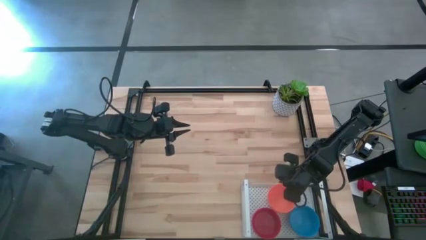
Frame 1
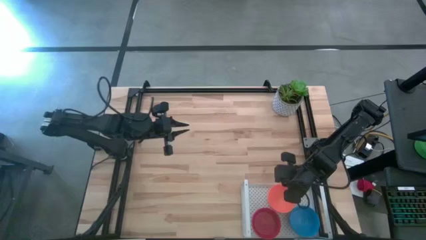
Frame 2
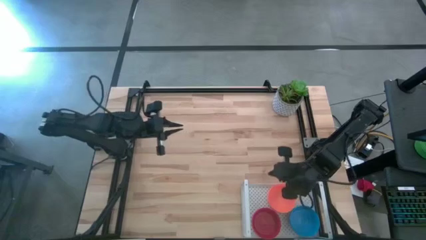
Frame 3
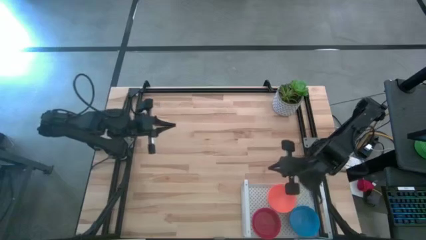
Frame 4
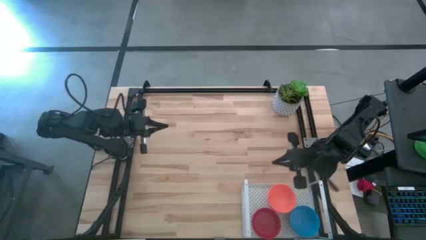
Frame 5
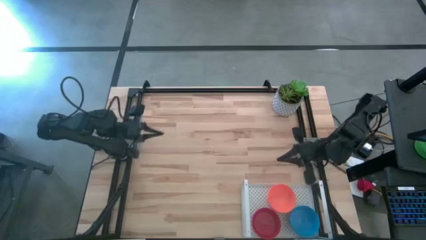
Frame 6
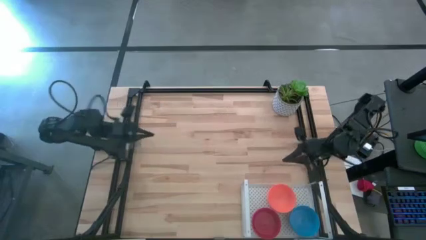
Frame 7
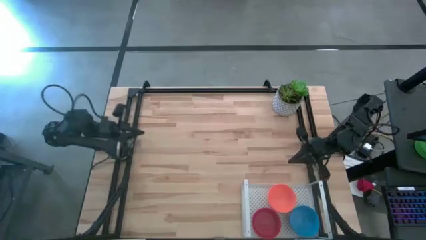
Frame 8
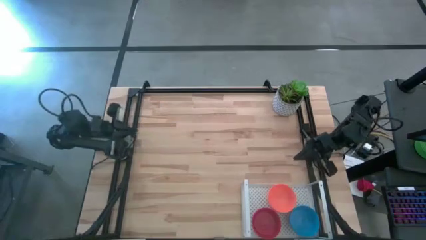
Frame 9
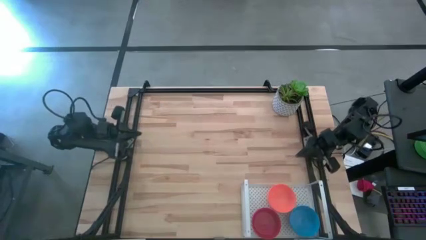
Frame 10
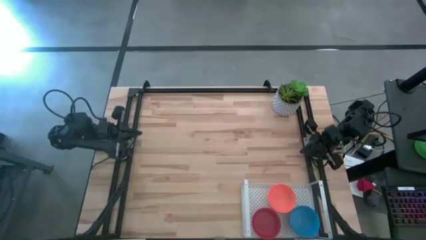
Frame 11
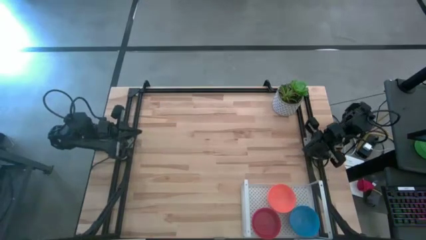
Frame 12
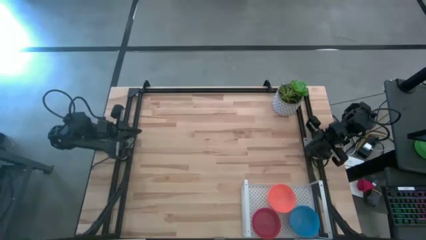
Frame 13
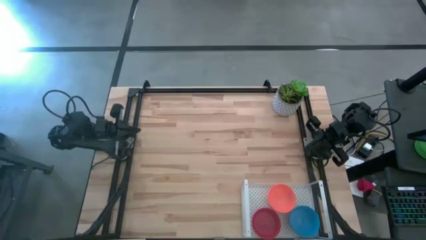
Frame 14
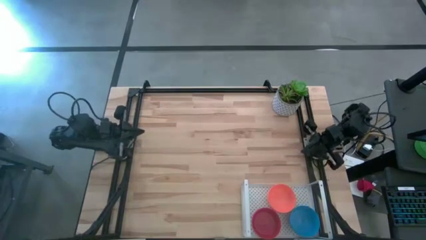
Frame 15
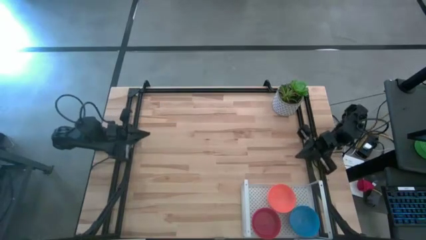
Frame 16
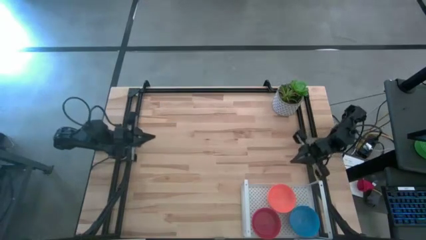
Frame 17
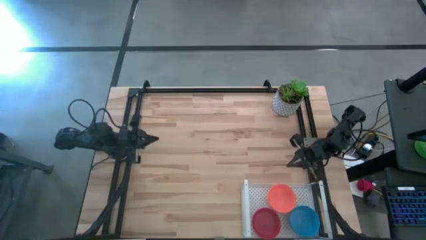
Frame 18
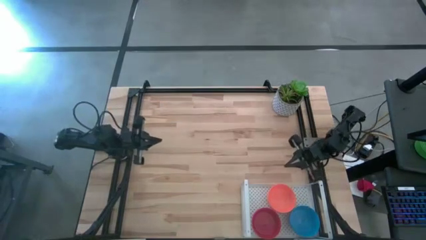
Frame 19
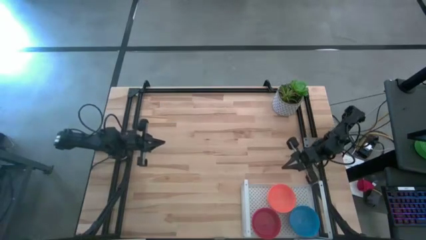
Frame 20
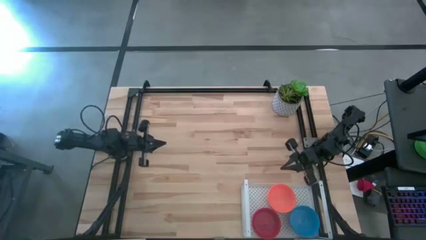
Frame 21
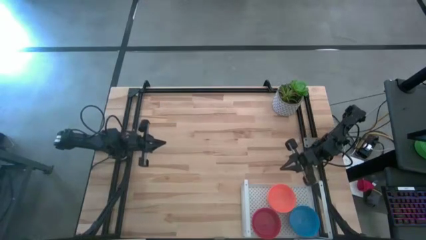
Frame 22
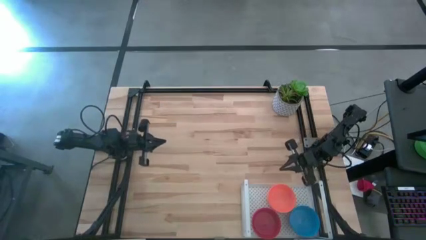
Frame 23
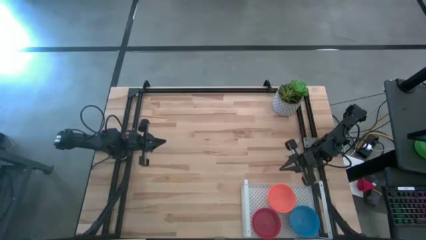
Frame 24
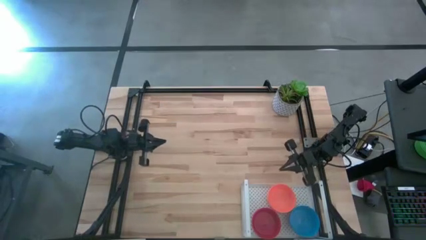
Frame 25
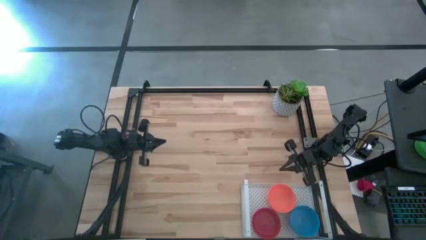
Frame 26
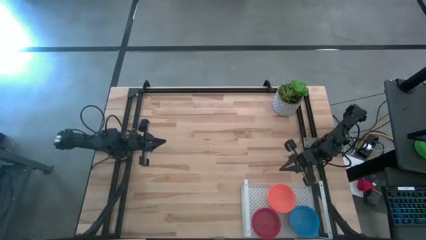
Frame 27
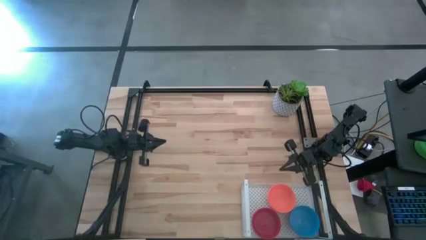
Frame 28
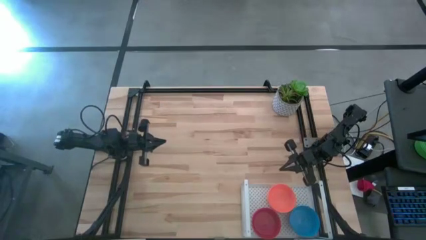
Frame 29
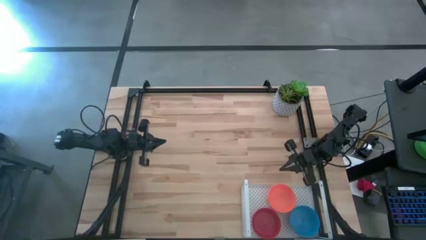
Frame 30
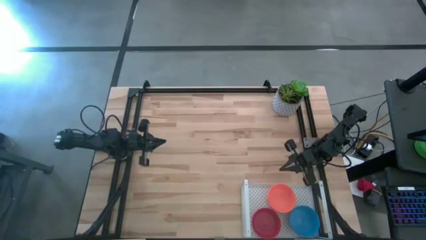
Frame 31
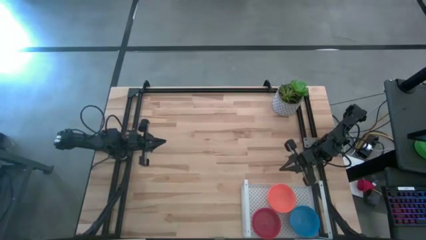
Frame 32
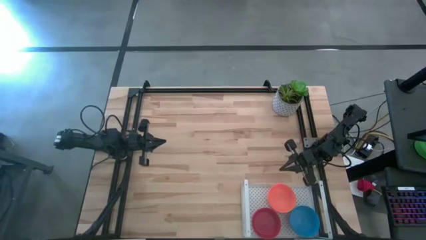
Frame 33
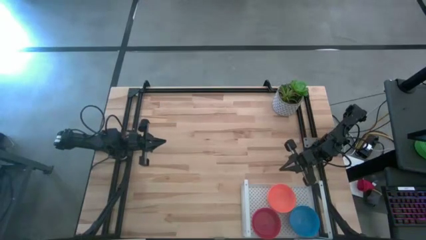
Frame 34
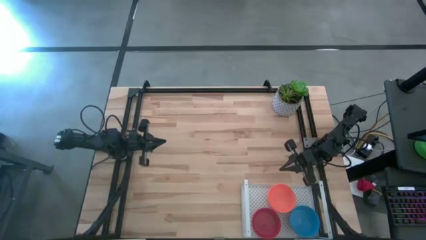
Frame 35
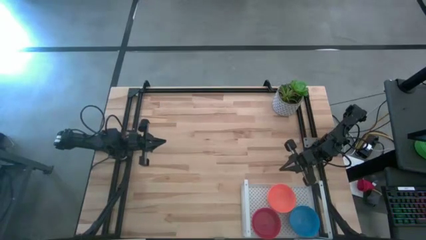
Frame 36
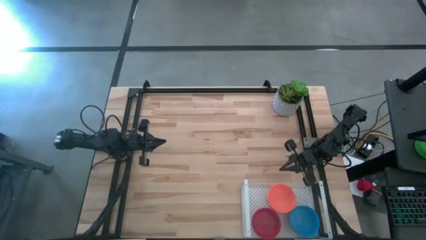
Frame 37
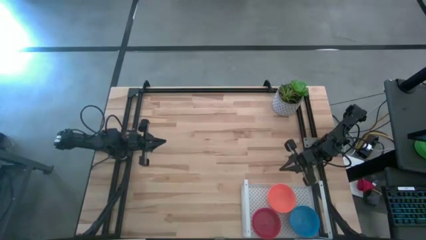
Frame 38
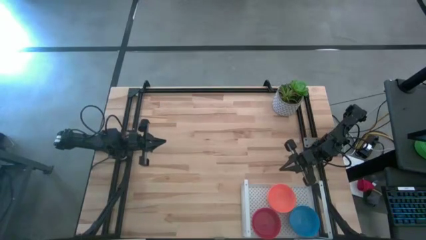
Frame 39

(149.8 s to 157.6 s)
Task: Pick & Place Mini bowls
Return to Home Position

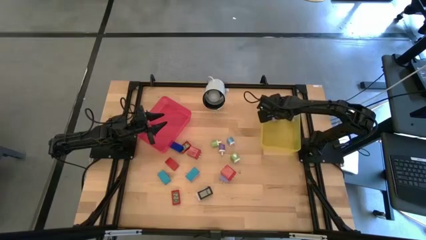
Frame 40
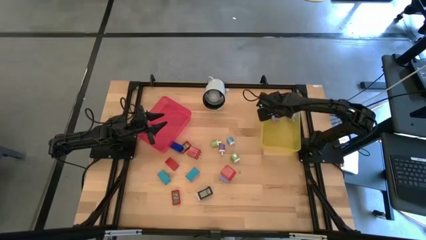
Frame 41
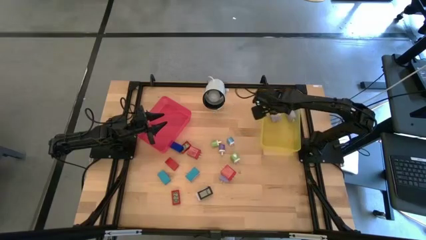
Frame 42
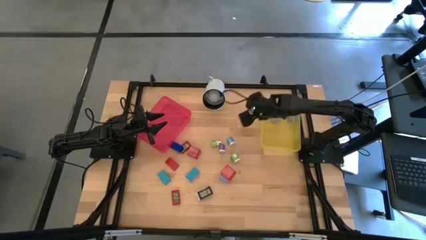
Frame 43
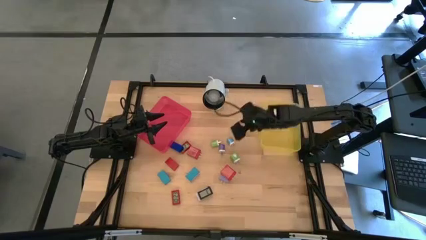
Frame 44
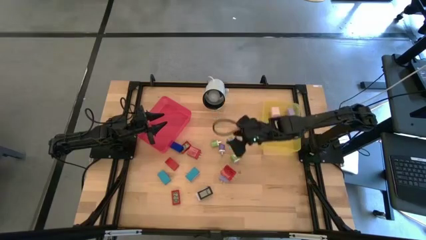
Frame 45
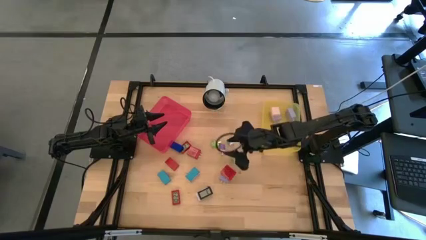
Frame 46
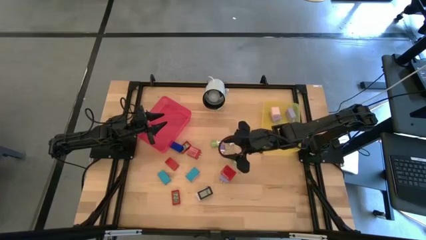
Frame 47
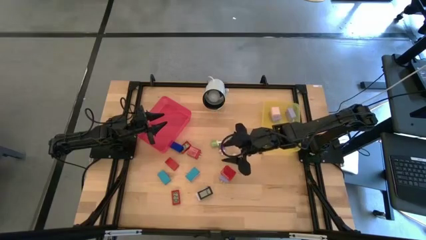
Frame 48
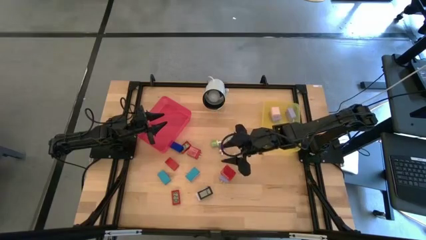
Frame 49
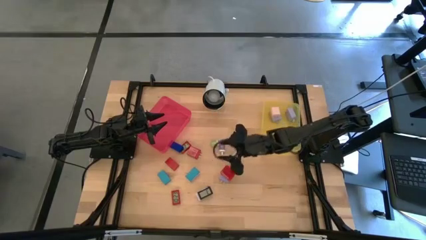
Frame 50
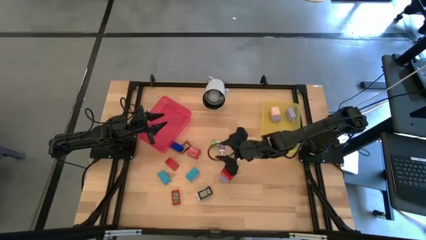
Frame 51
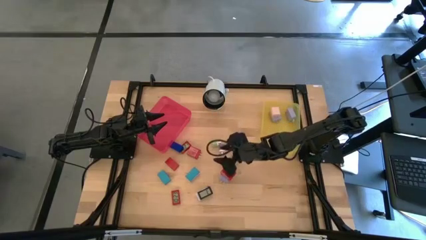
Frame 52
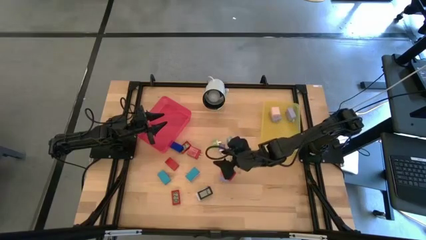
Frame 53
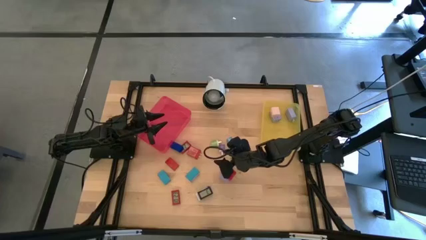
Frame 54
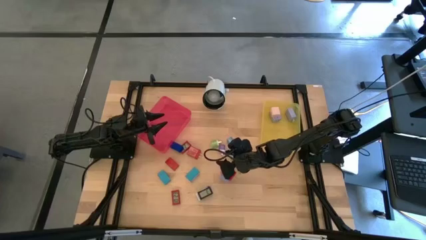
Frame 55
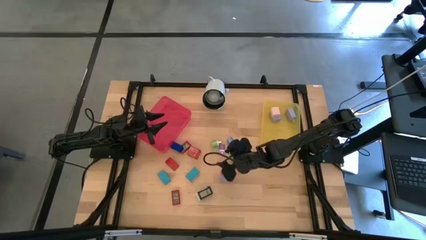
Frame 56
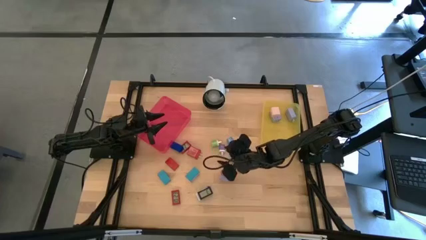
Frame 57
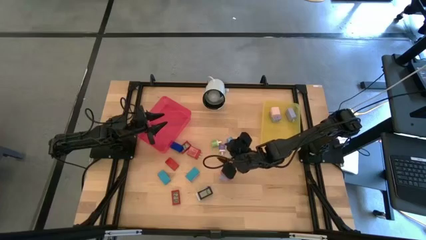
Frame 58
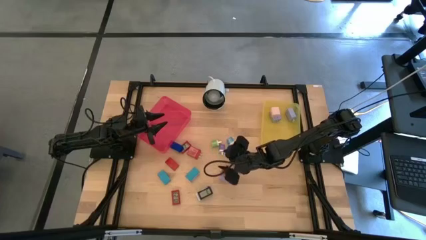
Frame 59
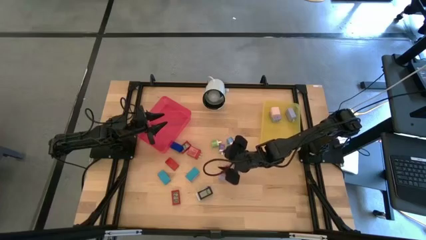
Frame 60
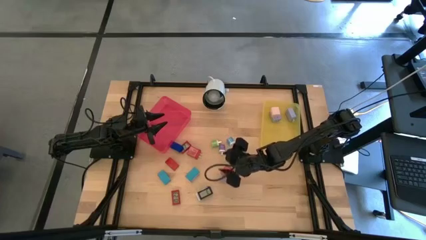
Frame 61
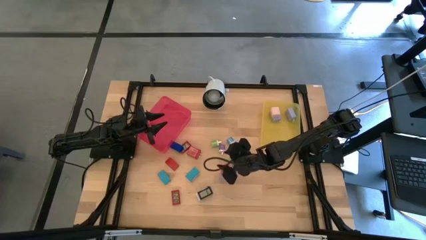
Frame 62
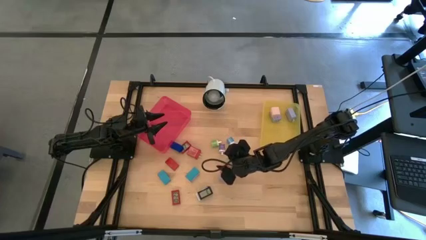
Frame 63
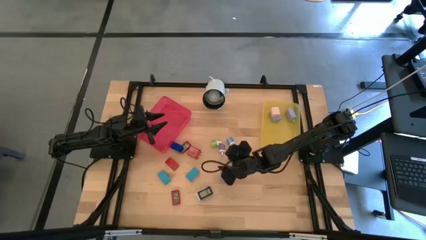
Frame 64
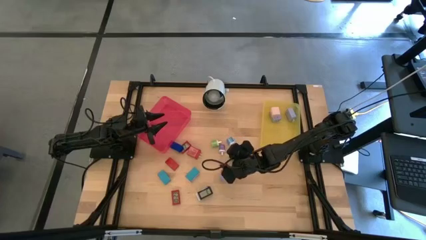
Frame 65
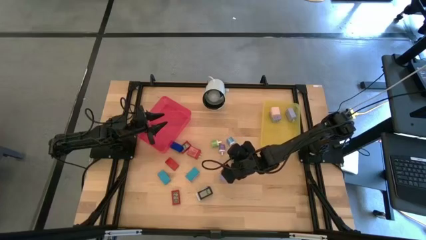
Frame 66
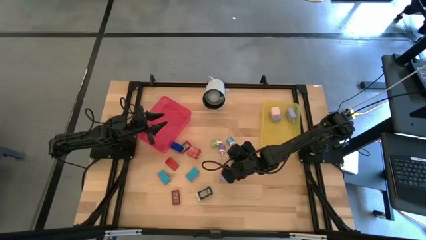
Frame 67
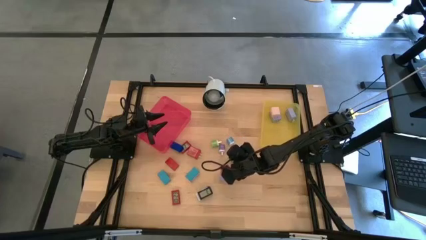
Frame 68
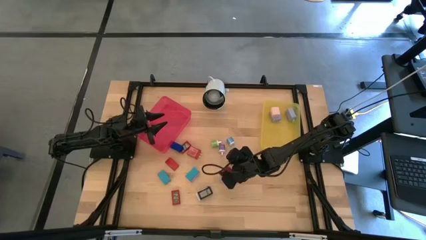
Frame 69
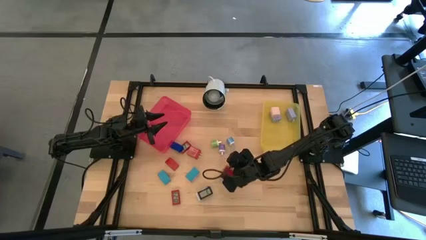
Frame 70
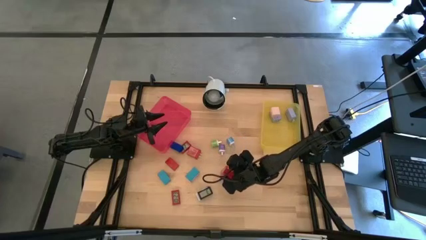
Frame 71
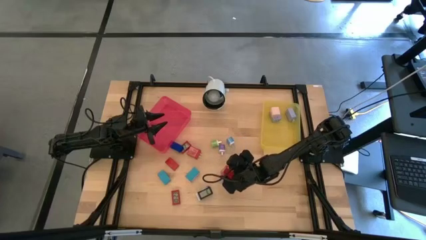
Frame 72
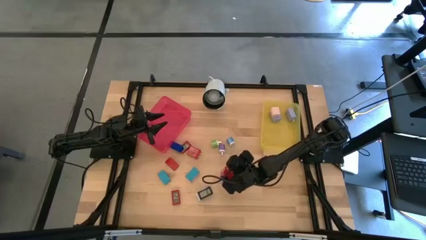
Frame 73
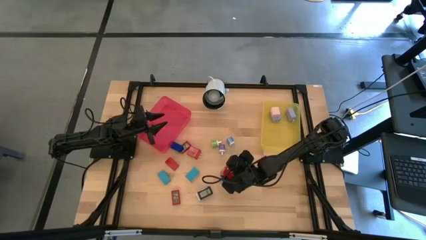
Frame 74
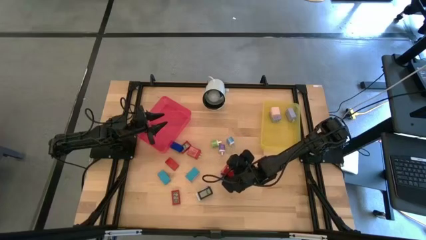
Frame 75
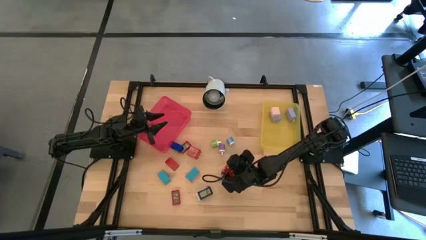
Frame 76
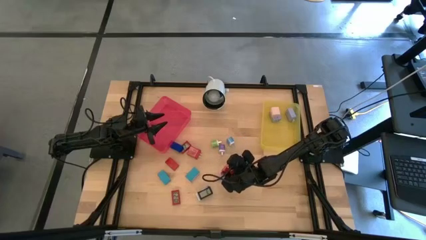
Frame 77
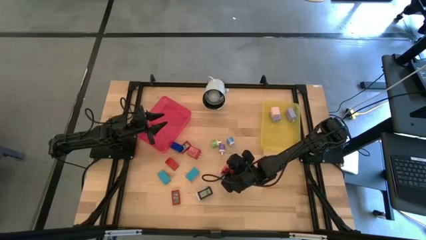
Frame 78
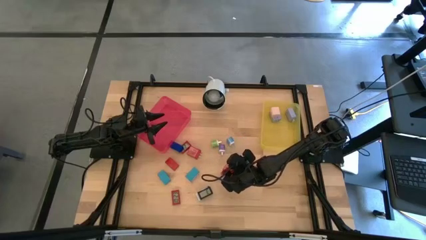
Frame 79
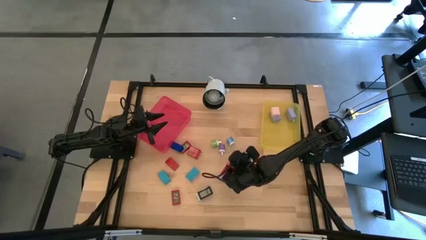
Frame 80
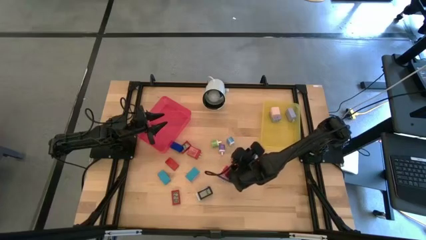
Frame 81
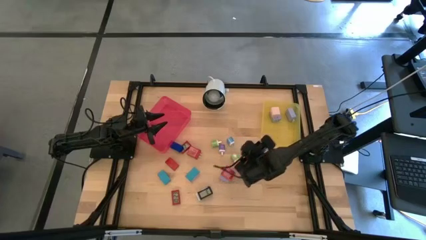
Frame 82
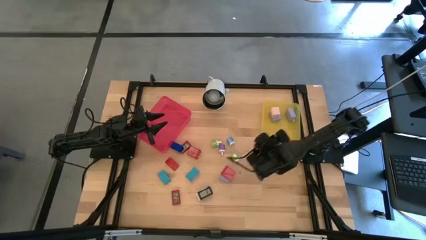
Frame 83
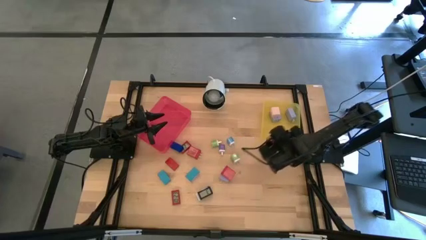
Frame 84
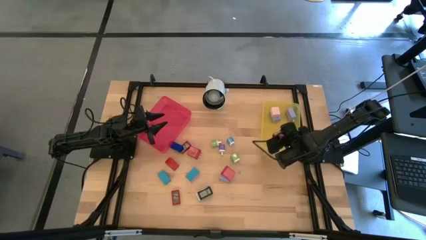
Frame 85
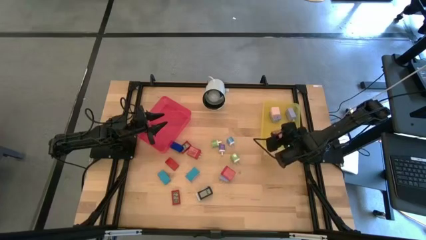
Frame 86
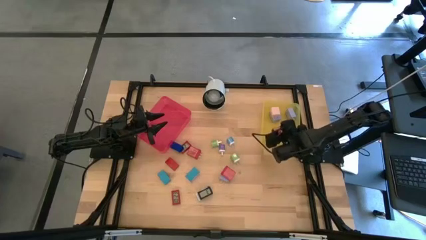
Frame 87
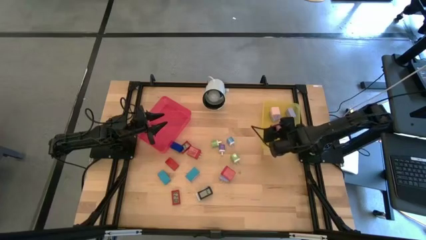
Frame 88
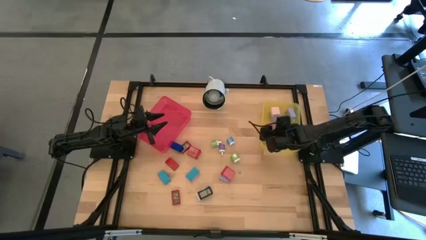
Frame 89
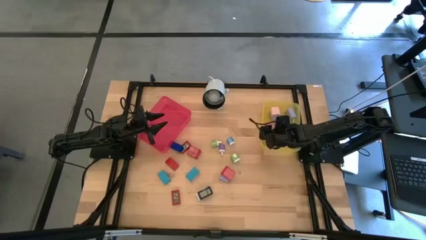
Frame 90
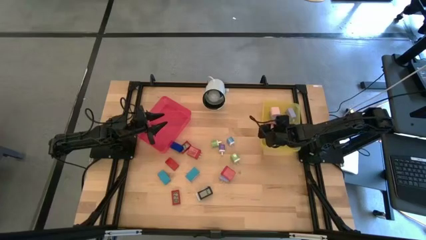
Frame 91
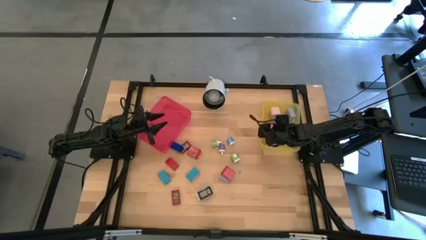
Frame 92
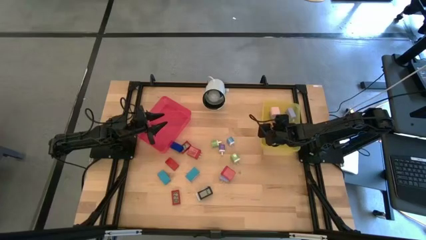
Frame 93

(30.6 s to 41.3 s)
Task: Pick & Place Office items
Put the right red charger adapter into the yellow bin
